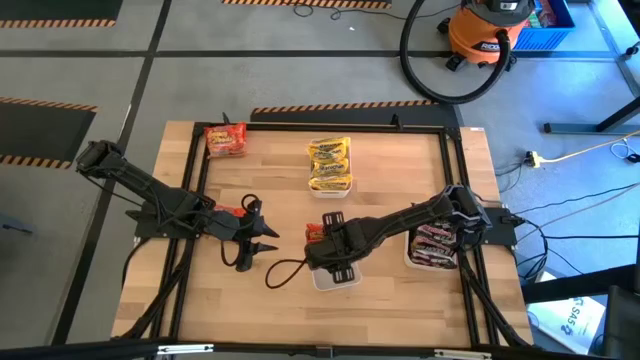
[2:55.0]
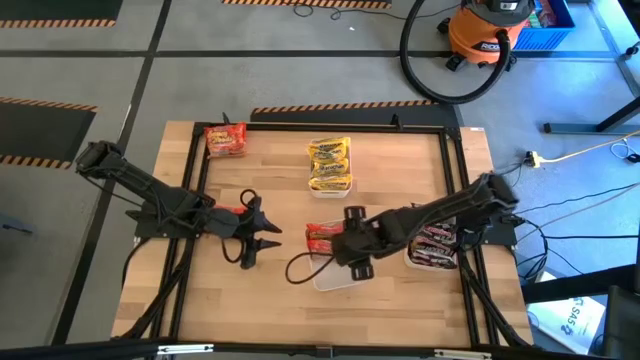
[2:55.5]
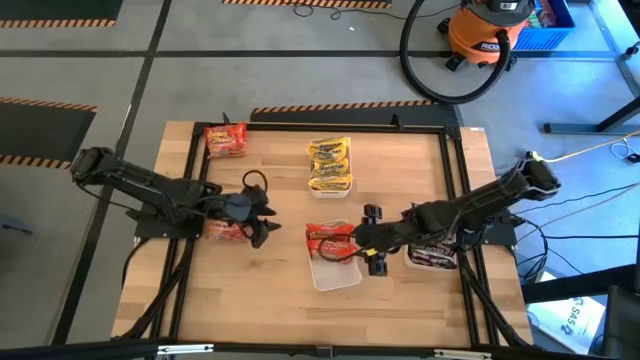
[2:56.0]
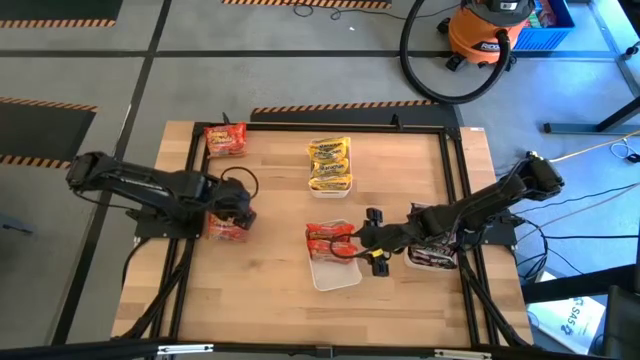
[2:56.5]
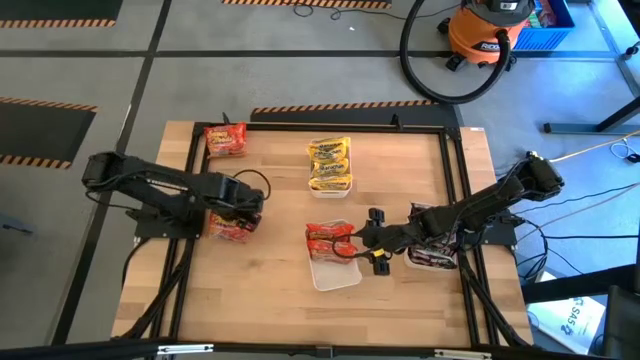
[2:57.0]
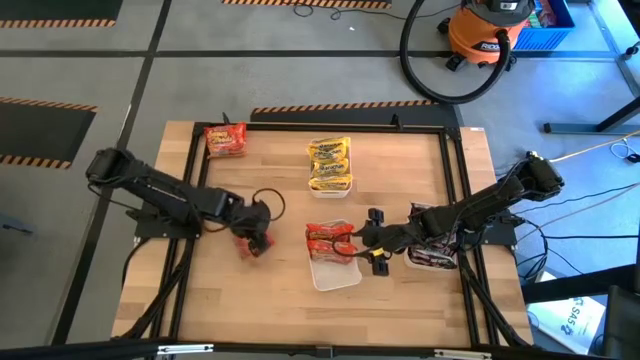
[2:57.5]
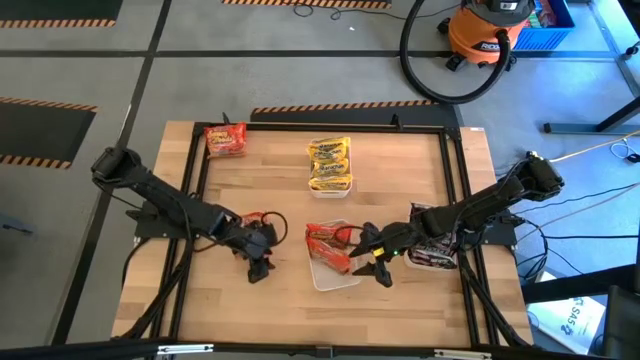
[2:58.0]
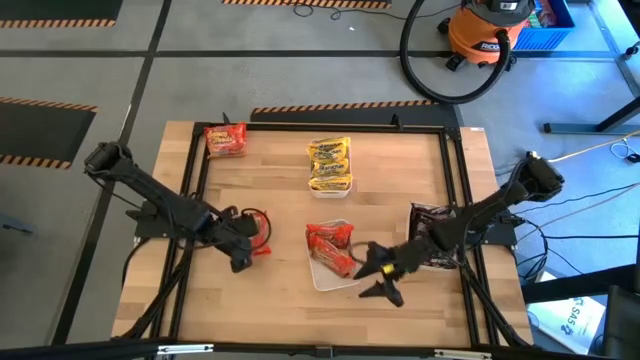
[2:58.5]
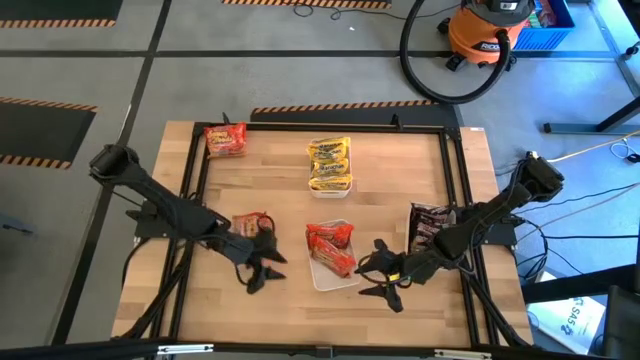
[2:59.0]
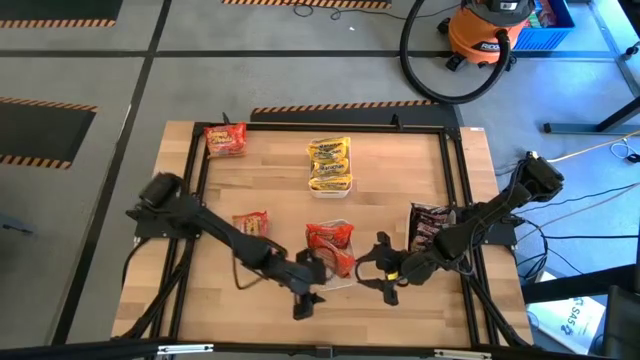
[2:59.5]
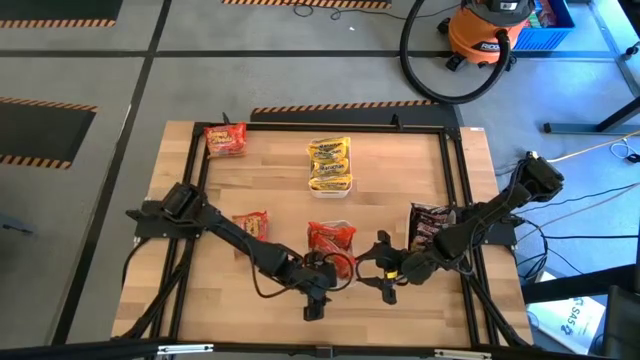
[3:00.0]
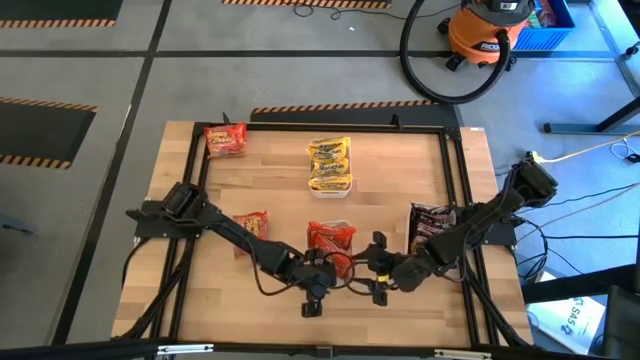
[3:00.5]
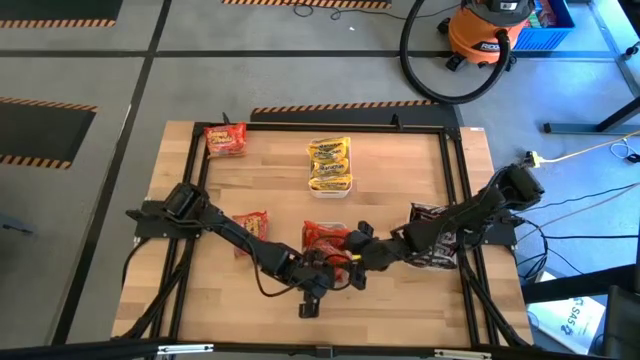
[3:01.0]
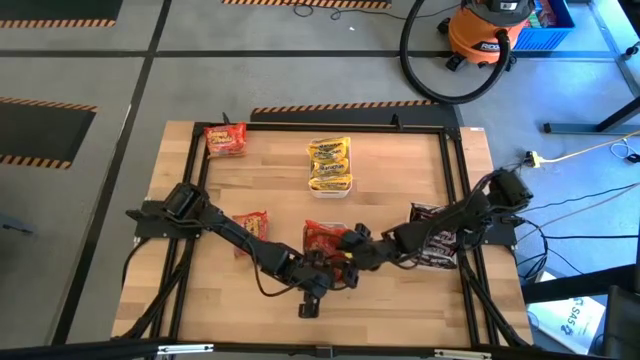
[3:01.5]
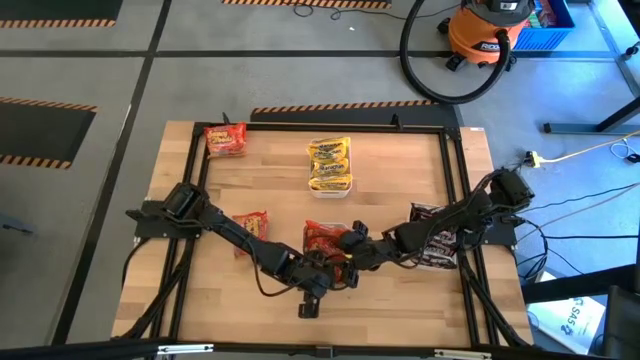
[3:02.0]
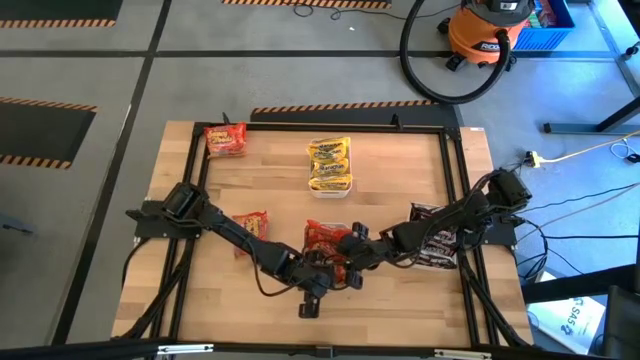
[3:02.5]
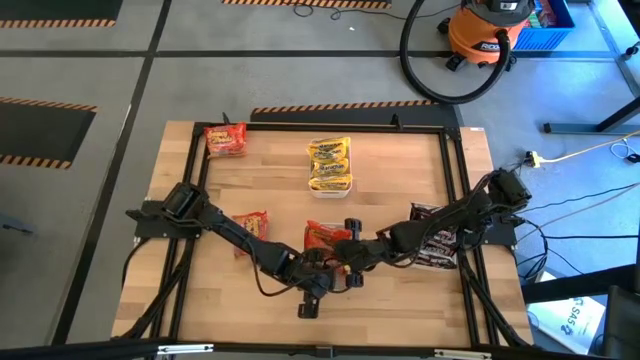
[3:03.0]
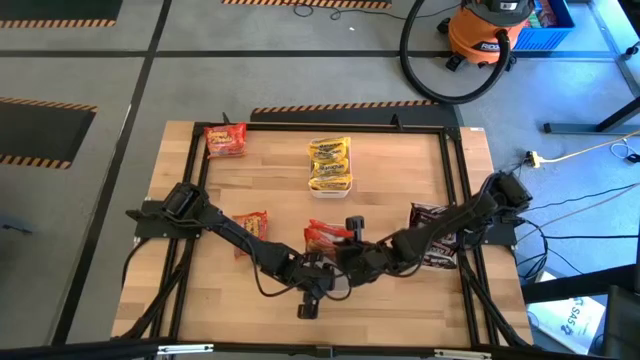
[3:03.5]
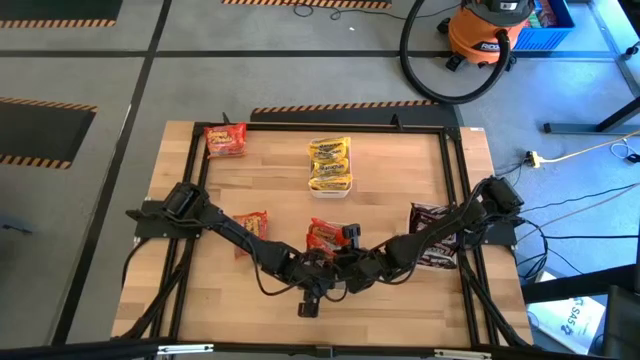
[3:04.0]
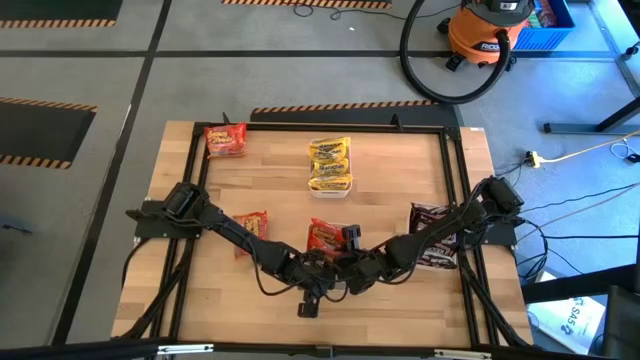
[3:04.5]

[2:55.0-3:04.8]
Task: Sort Maruchan noodles
Adjust the orange noodle pack

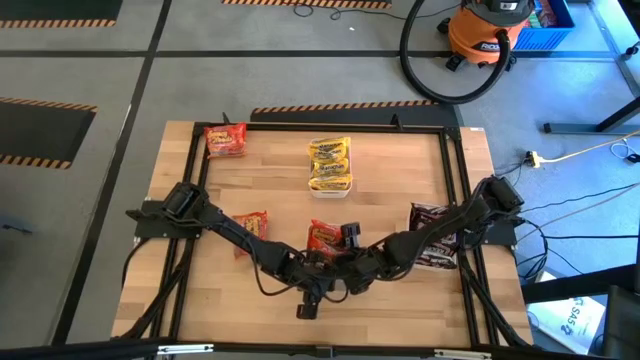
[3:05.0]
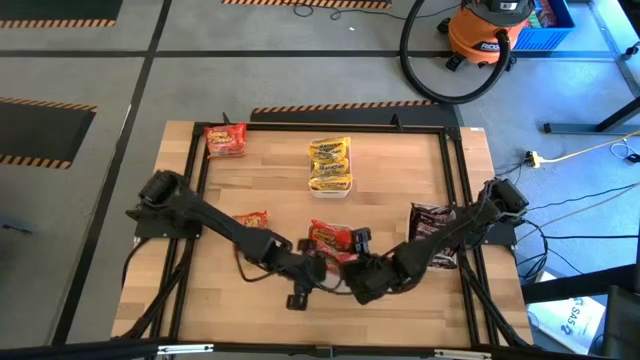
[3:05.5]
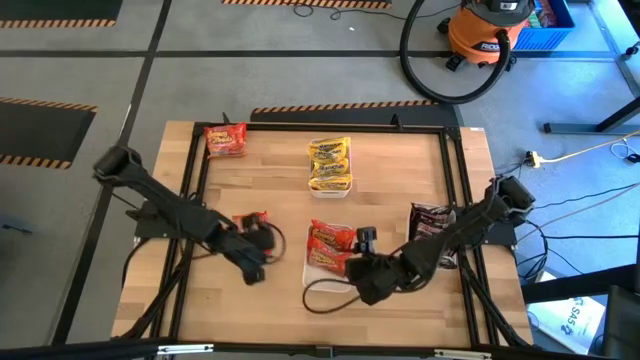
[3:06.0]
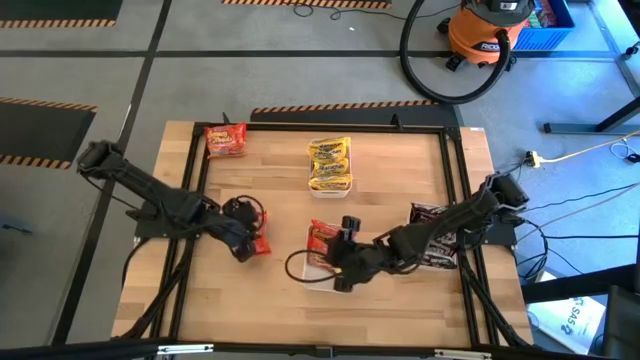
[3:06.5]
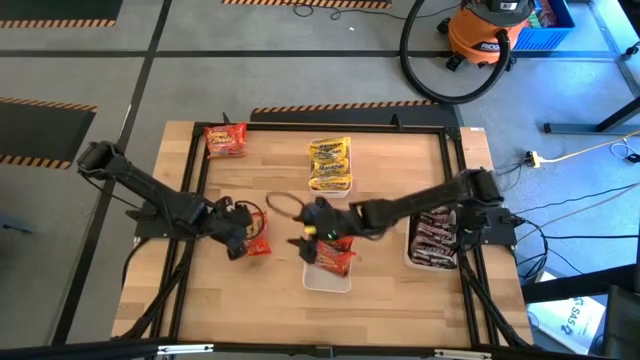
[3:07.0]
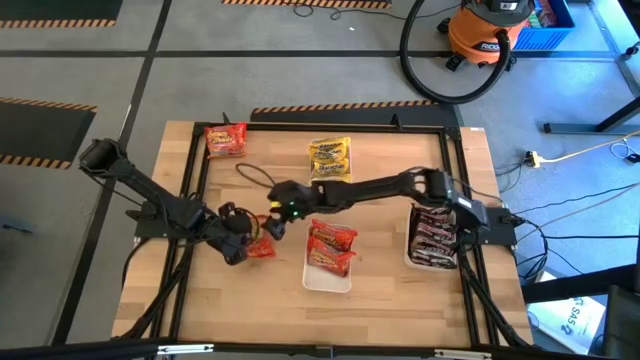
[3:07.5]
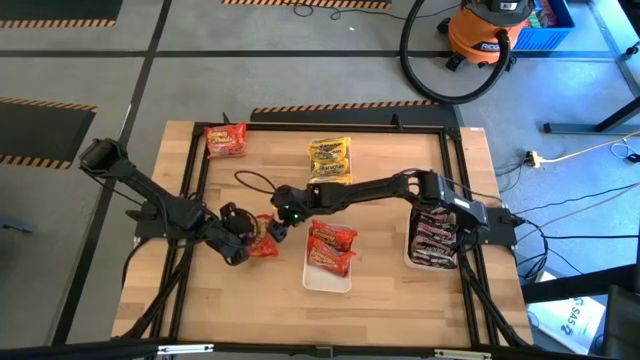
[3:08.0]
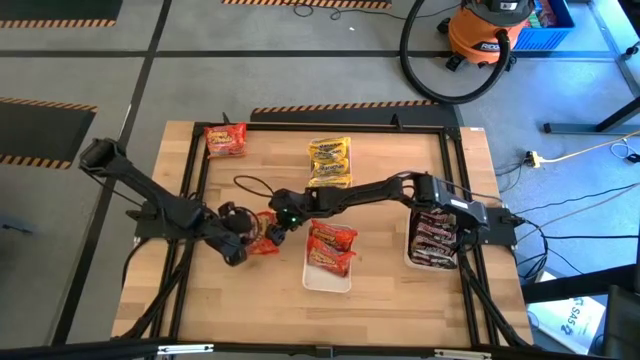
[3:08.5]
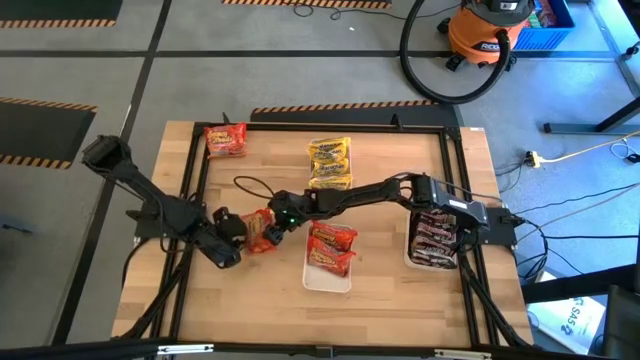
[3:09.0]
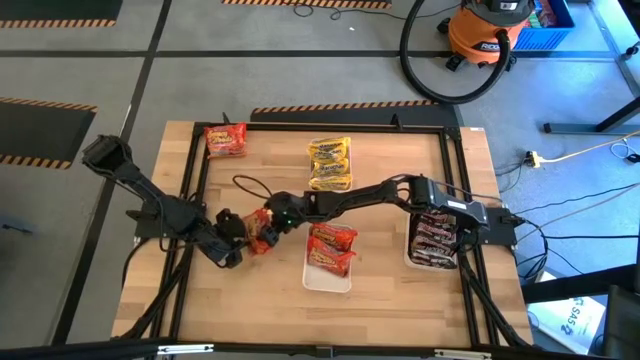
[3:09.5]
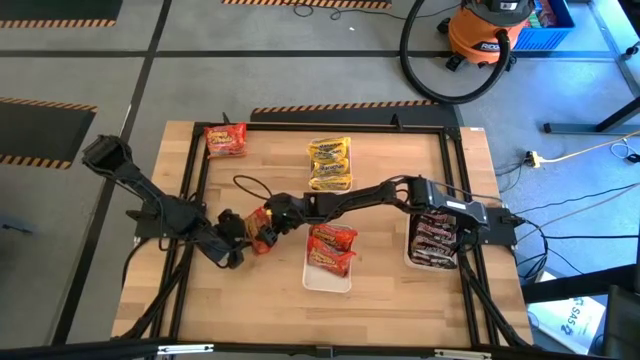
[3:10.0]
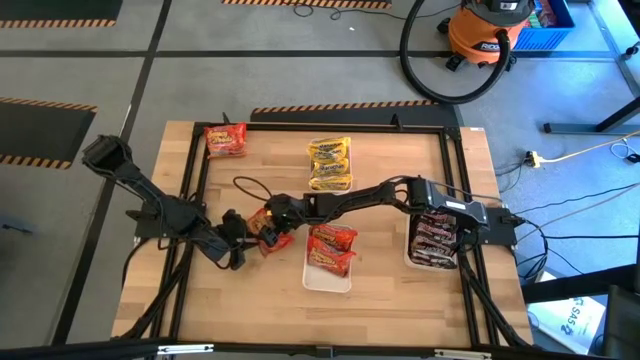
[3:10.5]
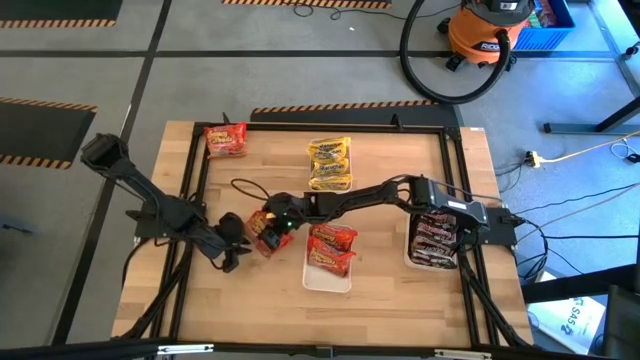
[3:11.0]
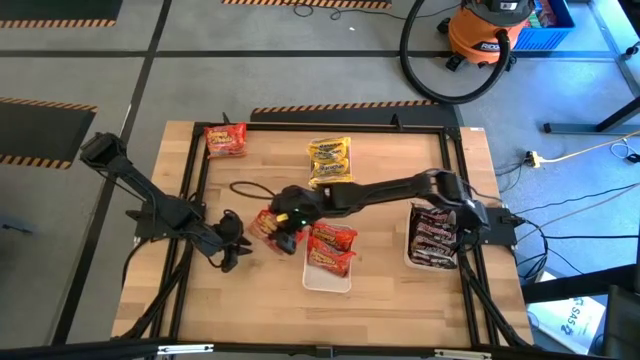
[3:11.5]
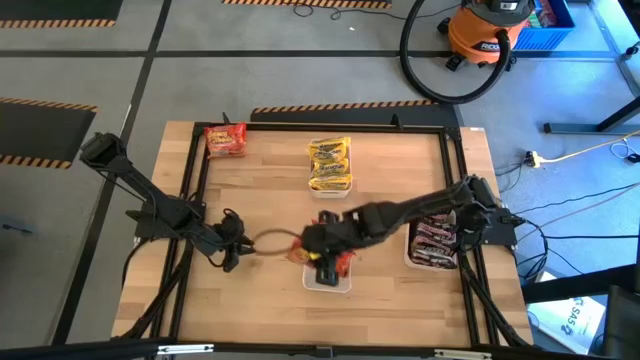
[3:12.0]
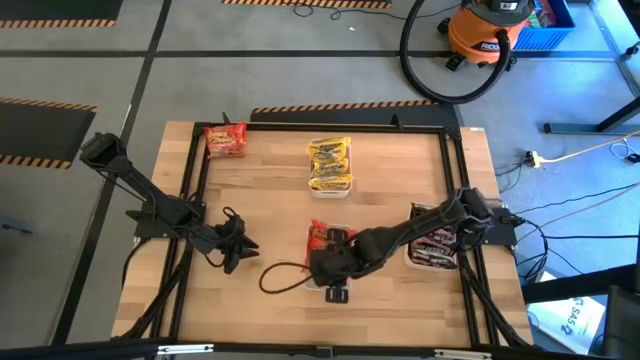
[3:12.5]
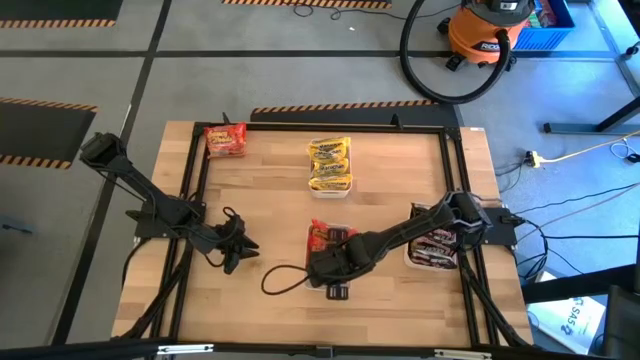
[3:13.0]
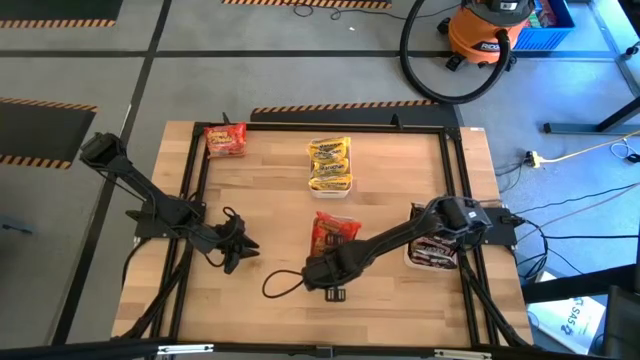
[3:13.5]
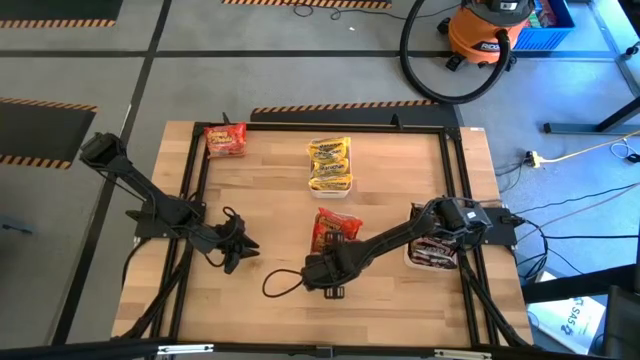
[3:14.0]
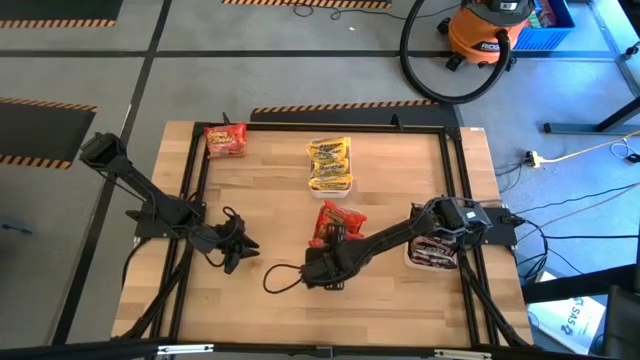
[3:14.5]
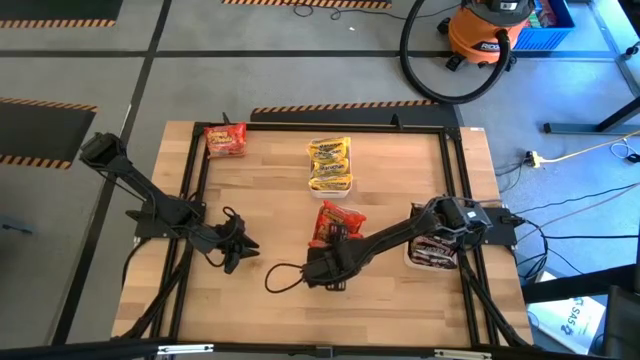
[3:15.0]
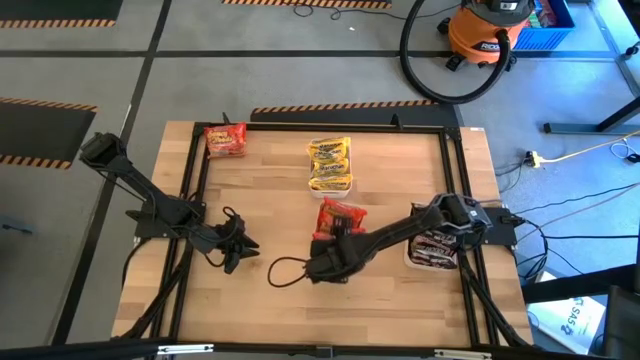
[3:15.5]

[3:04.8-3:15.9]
Put the bottom orange noodle pack into bottom white bin

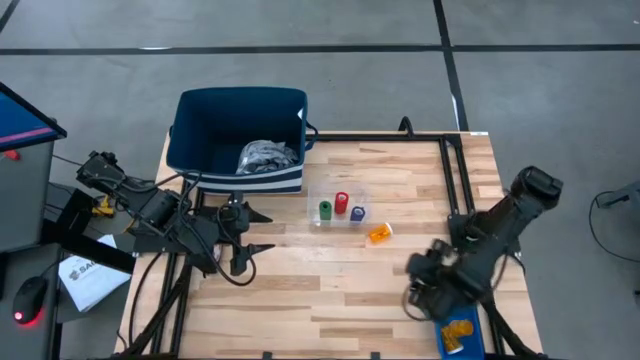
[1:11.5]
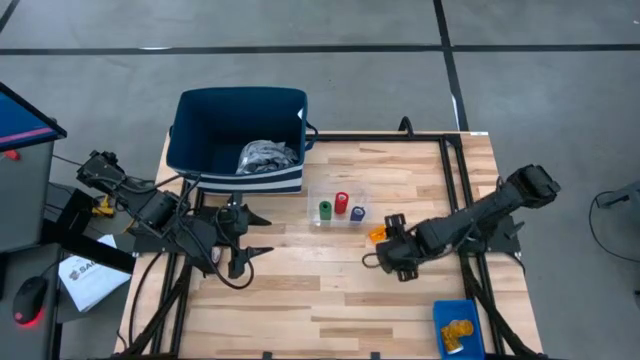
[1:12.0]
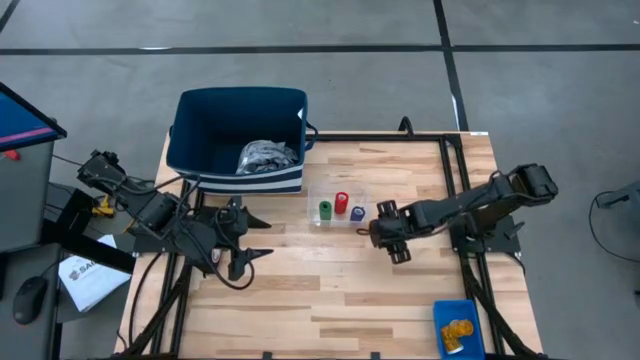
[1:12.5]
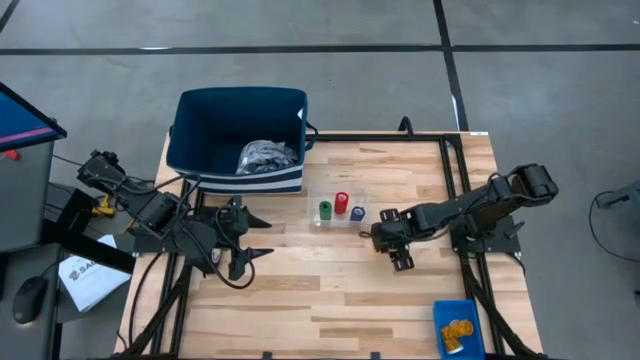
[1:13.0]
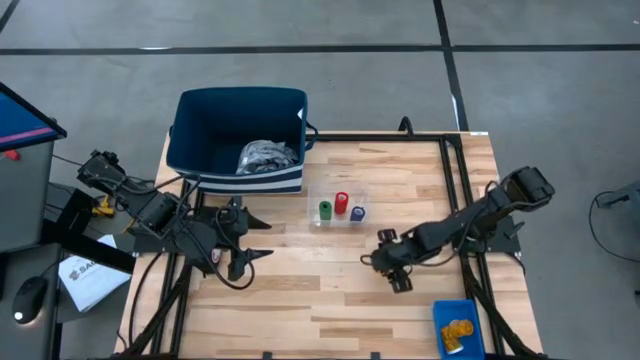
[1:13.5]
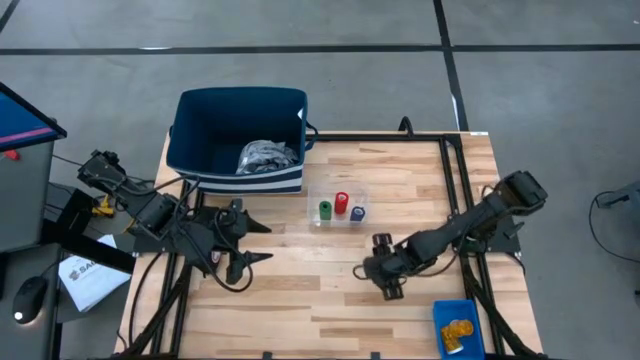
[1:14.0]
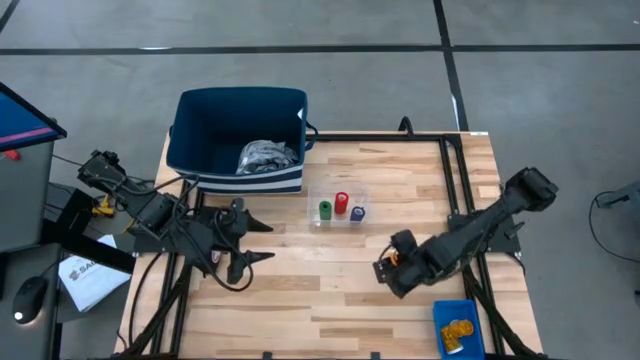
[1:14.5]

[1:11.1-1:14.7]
Task: Pick & place medical supplies in basket/bin
Put the orange pill bottle into the blue basket
